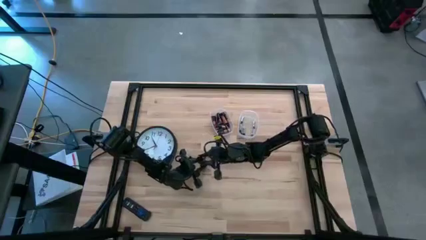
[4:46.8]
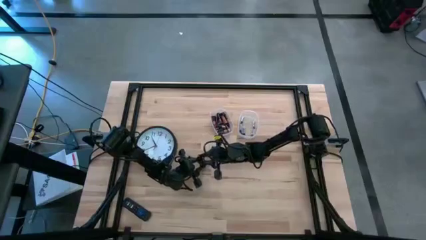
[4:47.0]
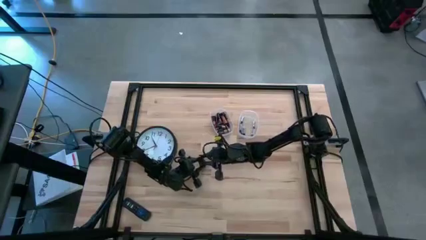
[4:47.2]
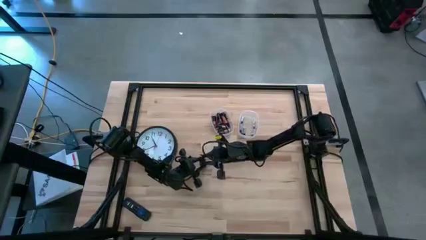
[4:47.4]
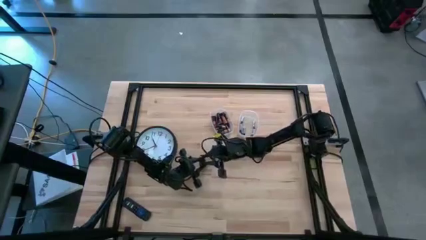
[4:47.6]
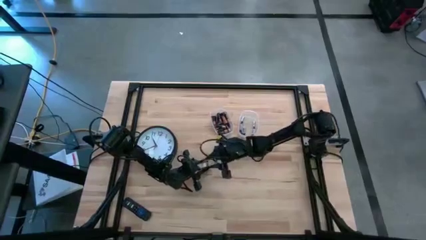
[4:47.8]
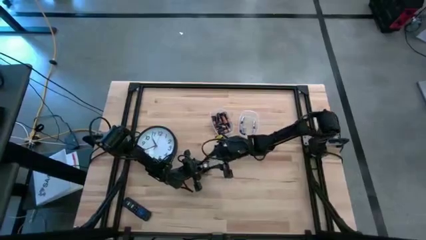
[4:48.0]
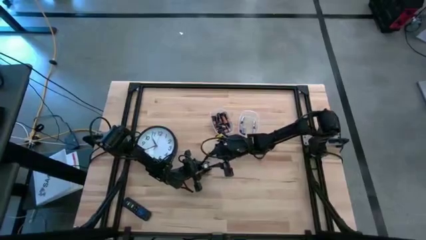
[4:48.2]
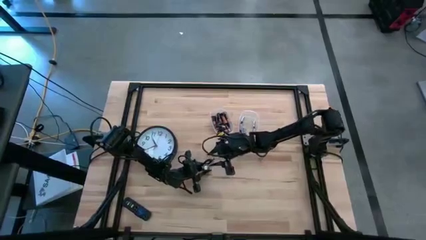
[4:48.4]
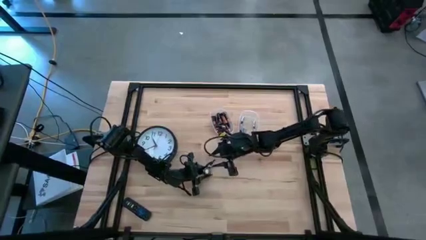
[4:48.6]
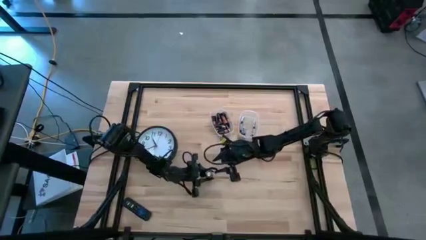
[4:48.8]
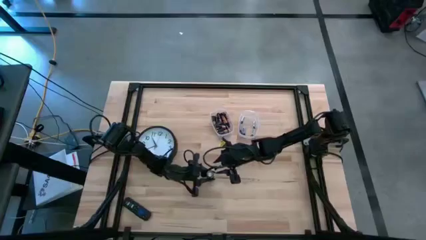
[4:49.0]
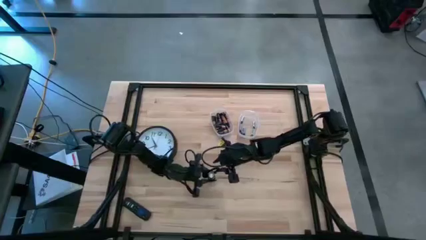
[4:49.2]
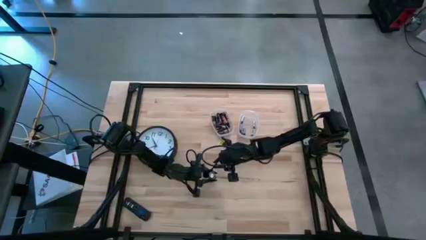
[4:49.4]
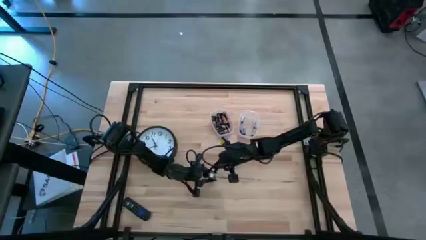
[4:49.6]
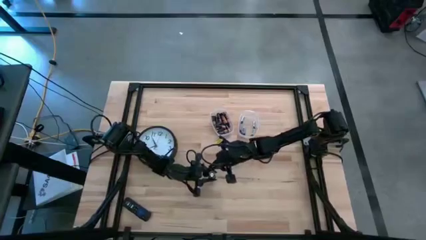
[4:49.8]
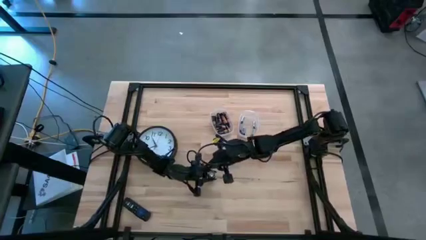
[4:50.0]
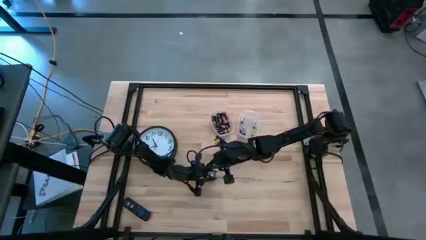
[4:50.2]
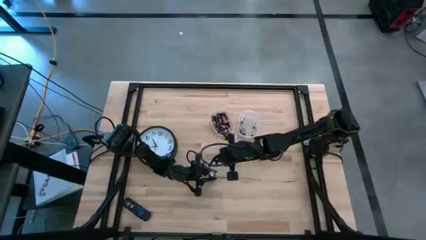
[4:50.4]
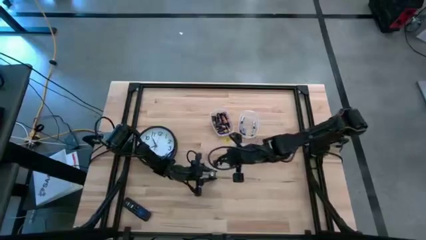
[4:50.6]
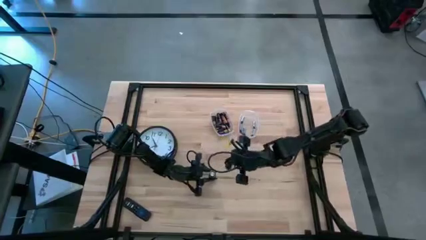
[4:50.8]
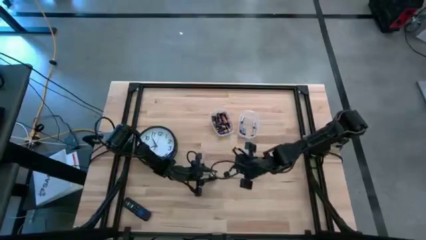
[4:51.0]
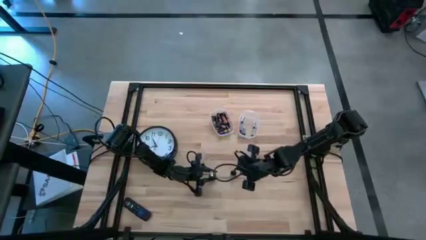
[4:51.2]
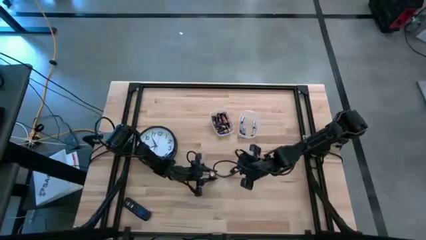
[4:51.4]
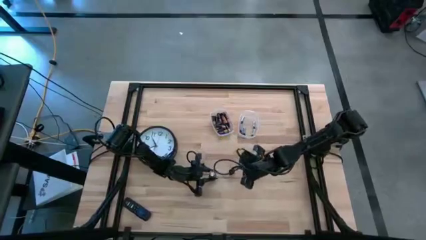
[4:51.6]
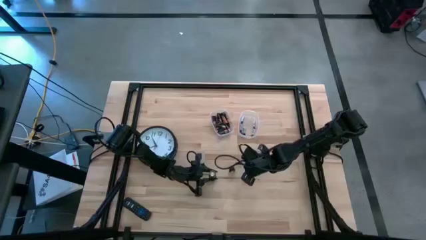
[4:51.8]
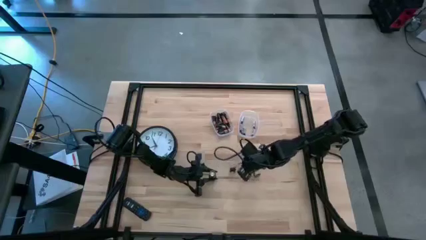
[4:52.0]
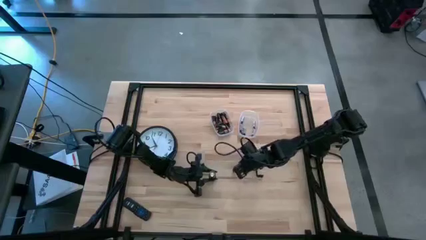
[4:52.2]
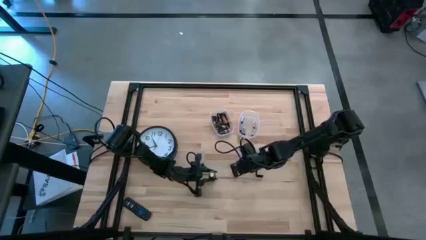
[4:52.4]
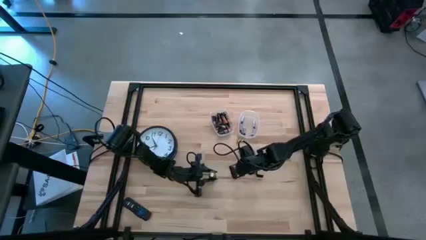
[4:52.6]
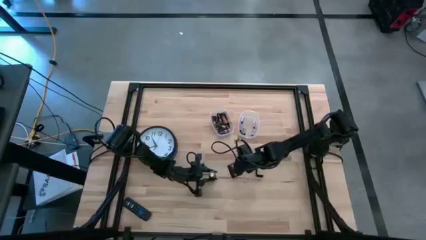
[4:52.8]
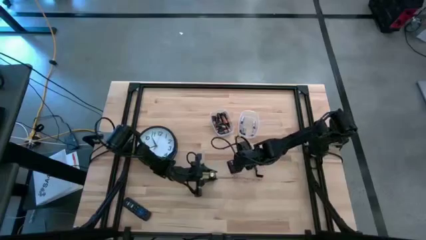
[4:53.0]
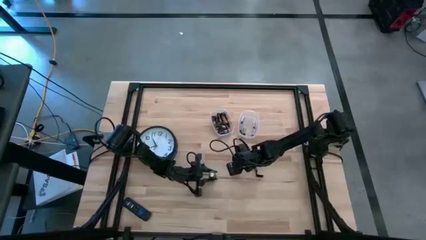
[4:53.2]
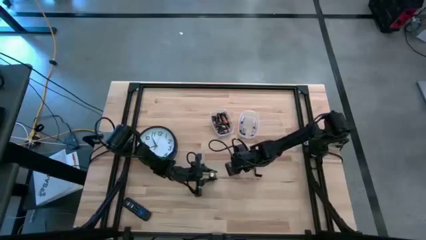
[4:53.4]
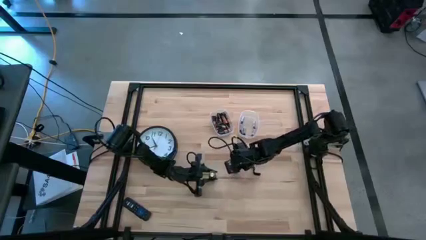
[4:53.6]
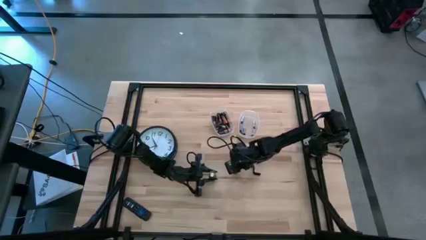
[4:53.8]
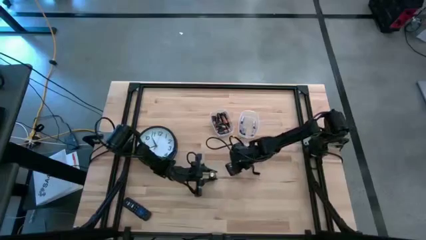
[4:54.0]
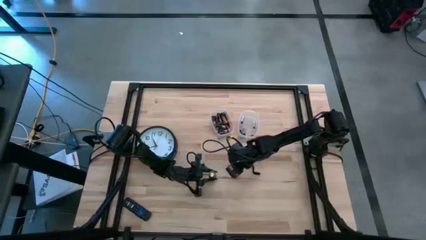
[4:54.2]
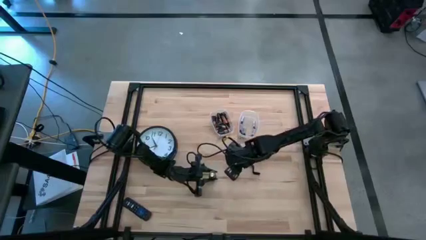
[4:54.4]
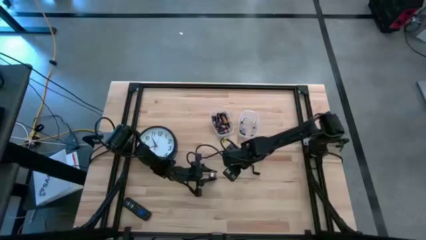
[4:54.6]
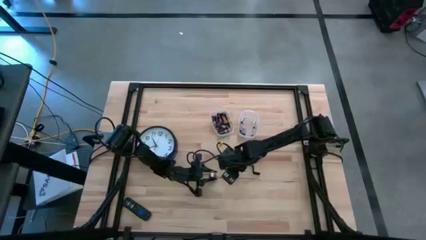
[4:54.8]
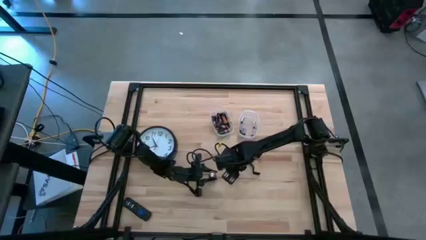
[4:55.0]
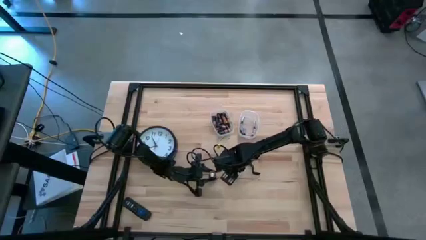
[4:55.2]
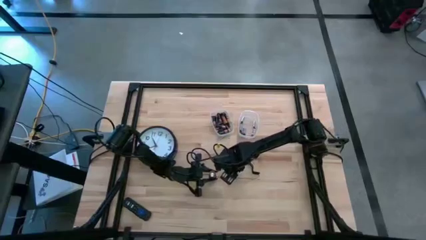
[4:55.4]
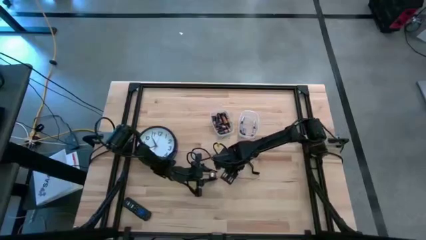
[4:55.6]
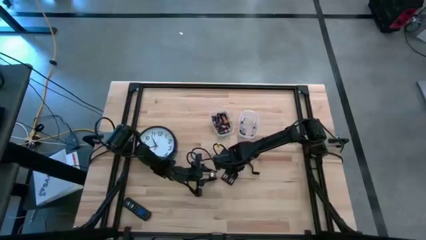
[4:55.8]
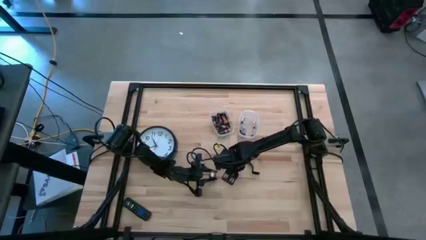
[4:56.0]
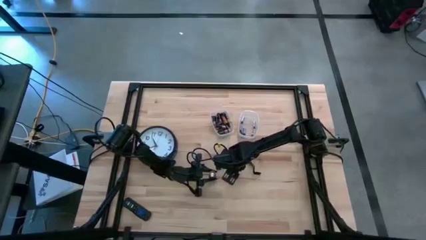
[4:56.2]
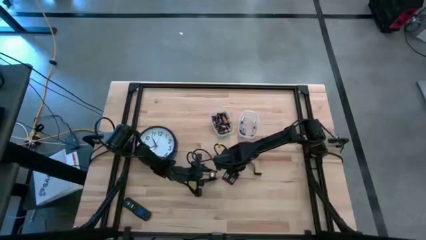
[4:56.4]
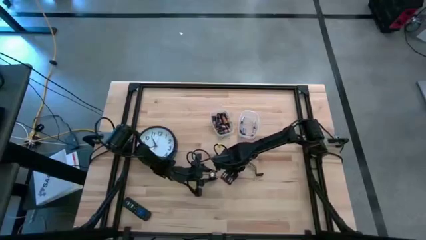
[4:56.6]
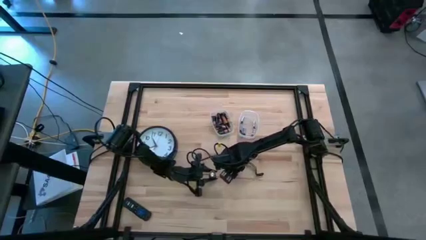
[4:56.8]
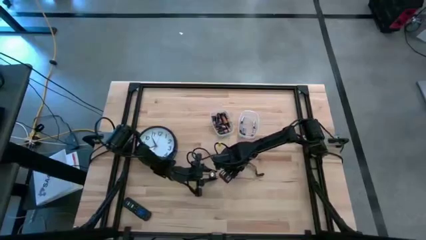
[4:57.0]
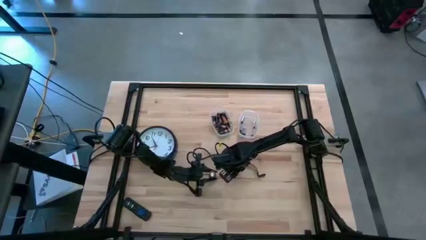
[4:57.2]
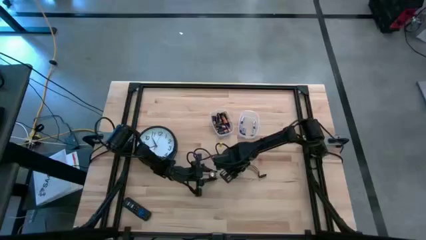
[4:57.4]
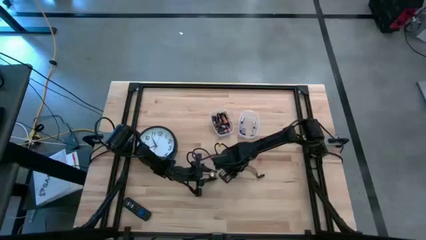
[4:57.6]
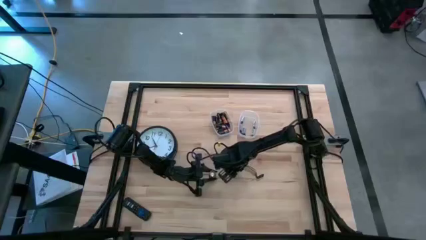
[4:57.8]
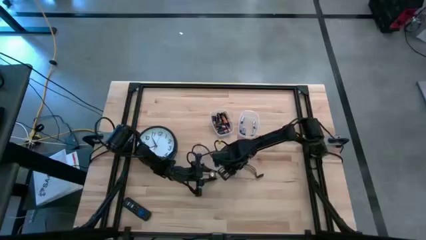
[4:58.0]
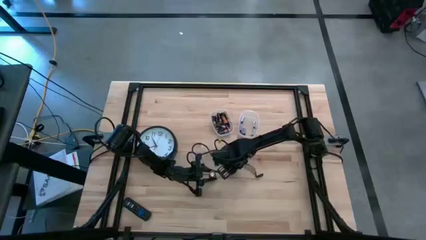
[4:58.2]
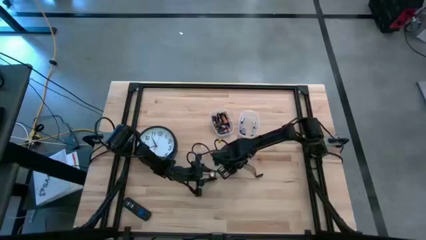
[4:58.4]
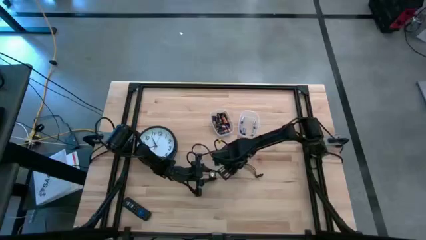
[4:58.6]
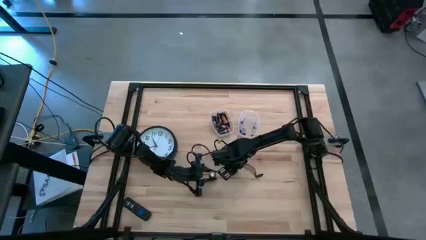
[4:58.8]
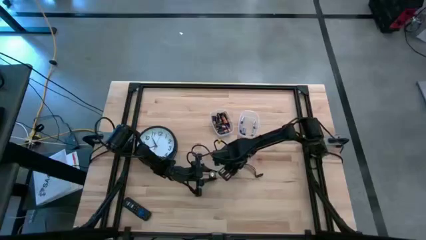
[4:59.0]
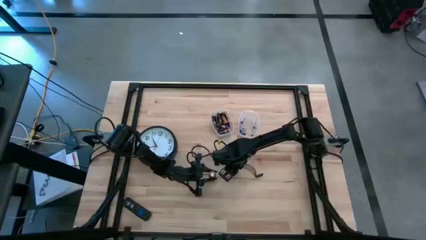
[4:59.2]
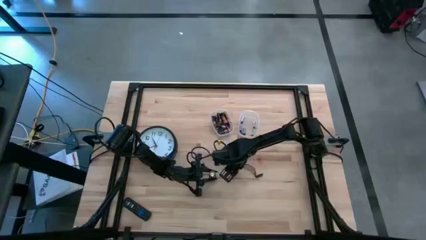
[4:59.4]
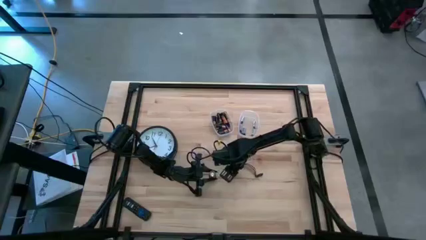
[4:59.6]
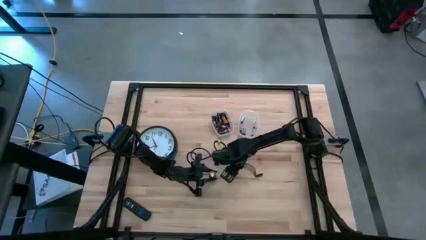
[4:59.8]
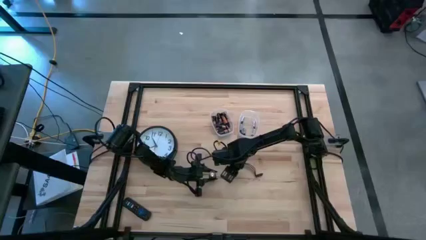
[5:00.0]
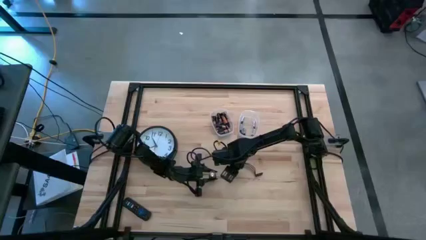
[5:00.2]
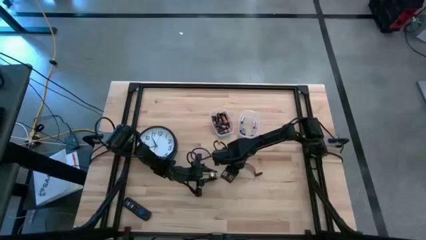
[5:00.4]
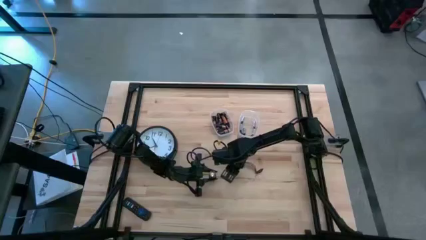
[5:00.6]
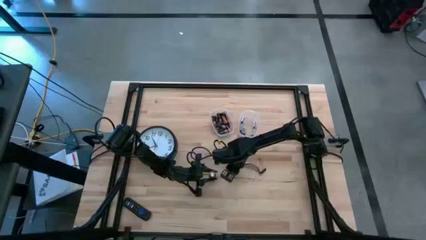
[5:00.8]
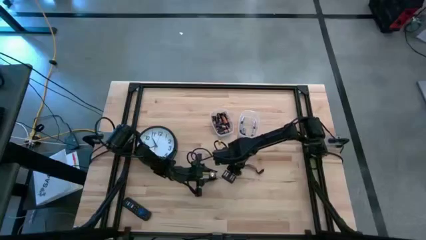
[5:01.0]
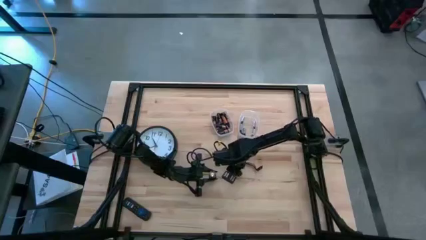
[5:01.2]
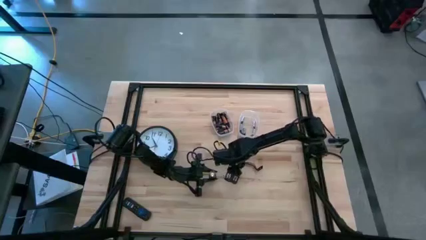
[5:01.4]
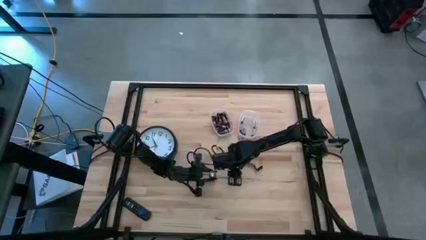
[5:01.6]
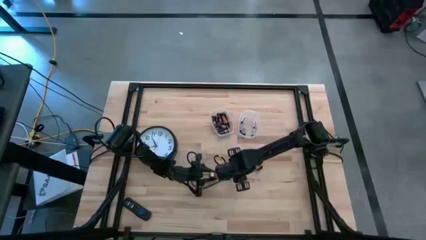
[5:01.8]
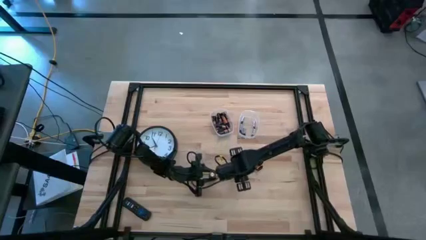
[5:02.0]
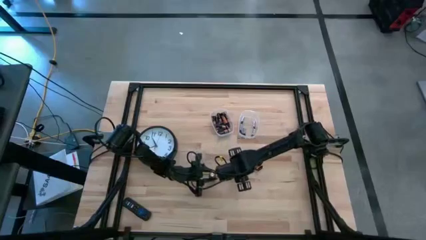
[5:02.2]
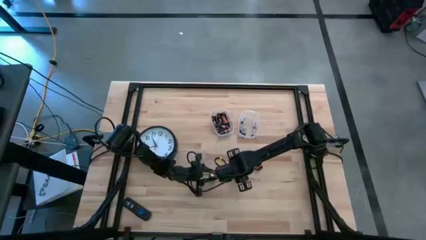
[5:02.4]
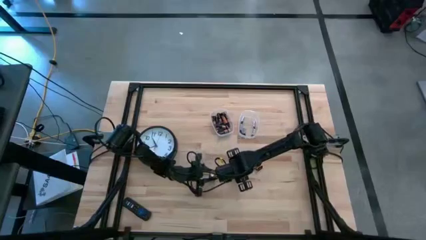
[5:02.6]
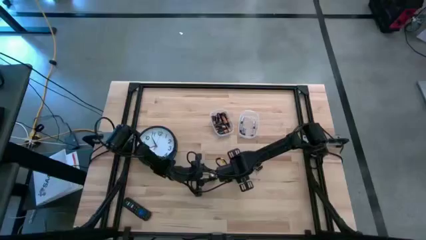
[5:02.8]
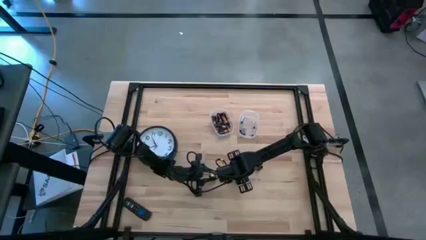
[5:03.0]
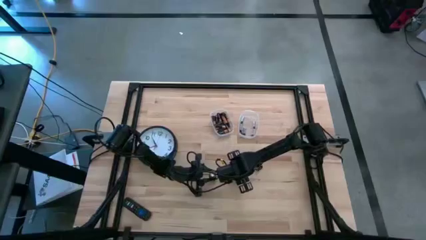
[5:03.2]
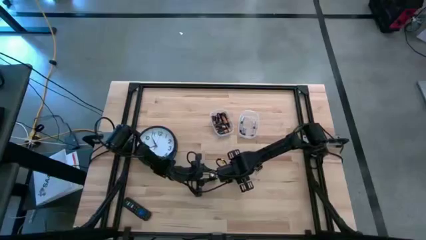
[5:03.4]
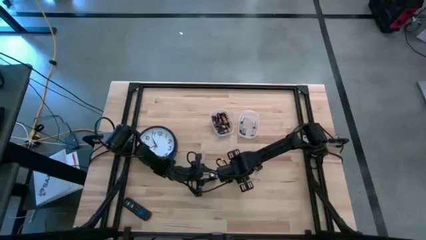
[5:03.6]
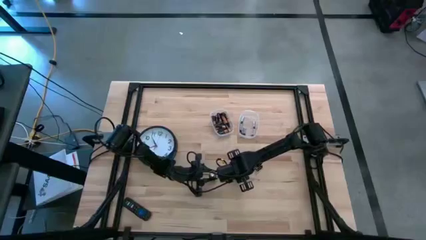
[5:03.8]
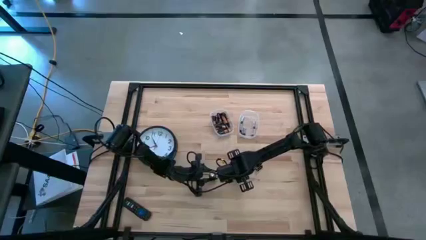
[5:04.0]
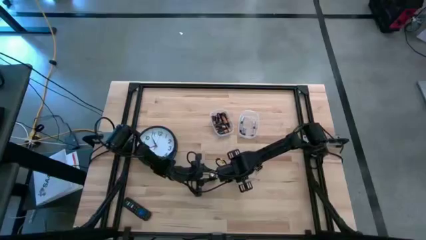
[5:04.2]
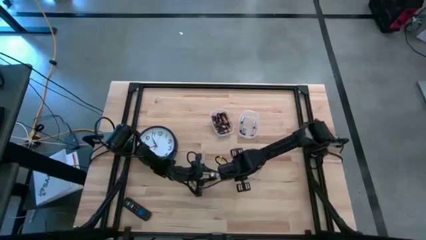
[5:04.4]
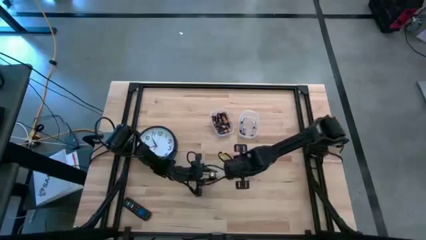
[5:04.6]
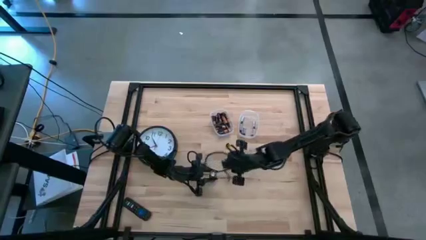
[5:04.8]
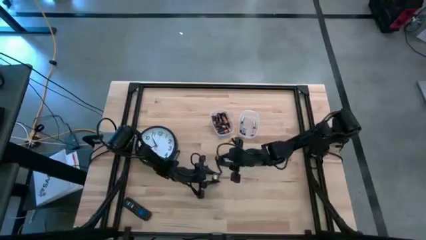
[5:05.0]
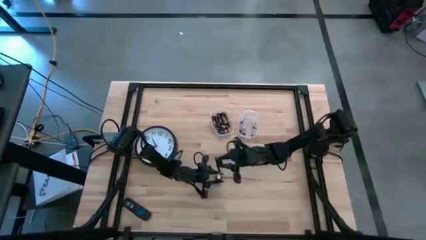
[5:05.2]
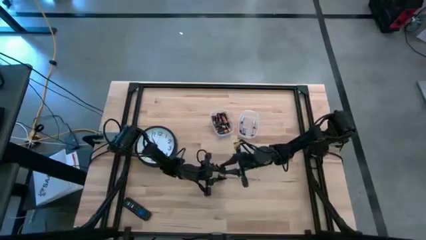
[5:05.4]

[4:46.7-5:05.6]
Task: Insert battery
Close the lid of the black flashlight
